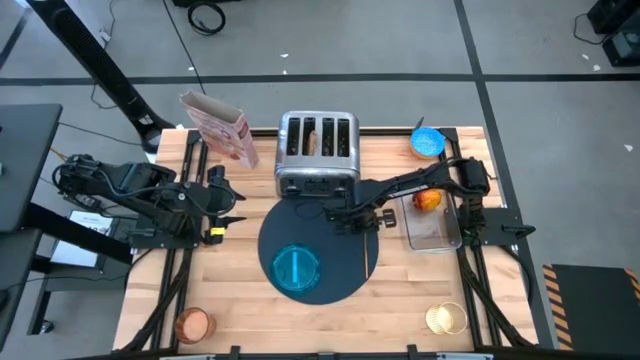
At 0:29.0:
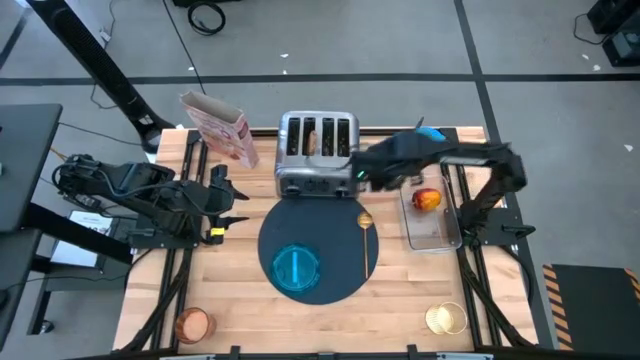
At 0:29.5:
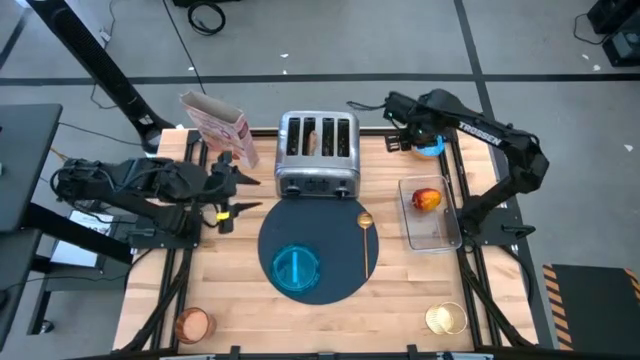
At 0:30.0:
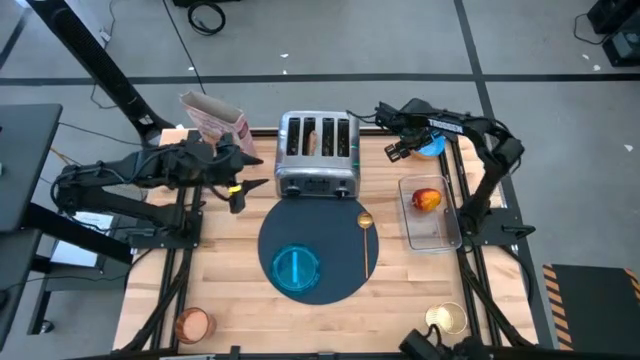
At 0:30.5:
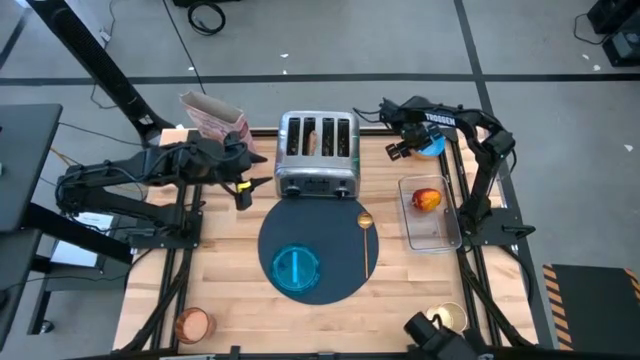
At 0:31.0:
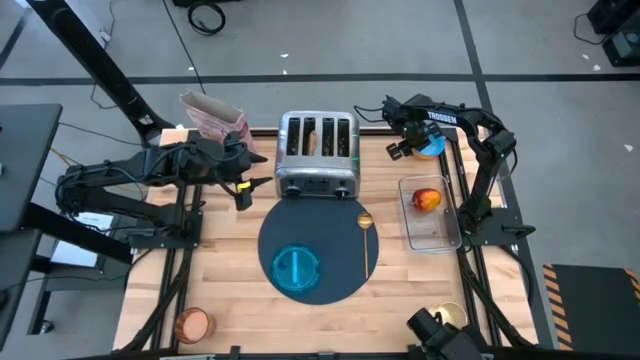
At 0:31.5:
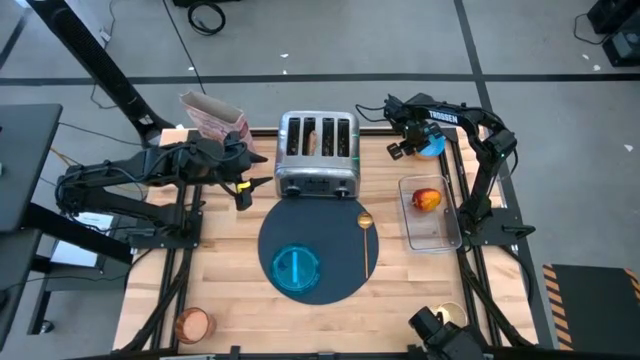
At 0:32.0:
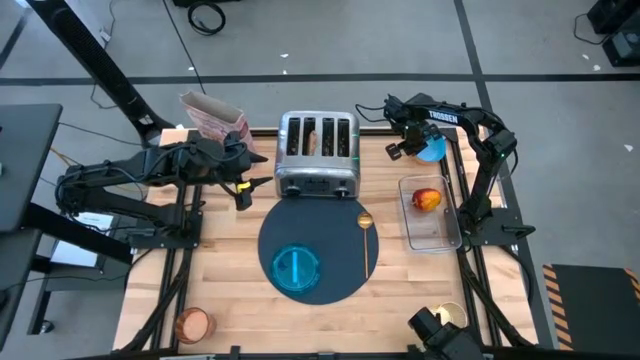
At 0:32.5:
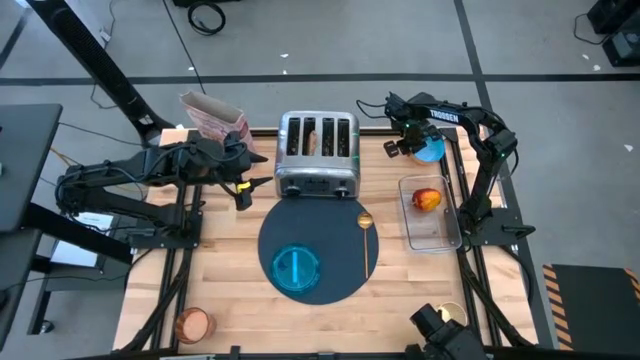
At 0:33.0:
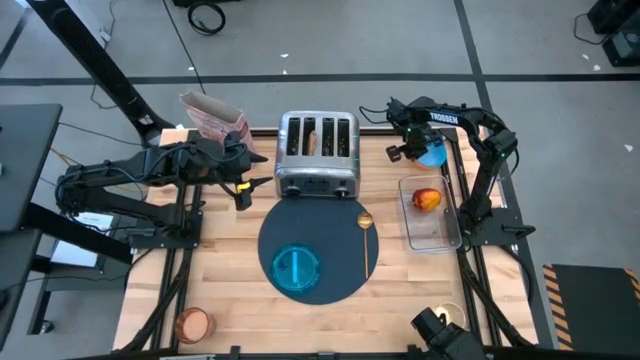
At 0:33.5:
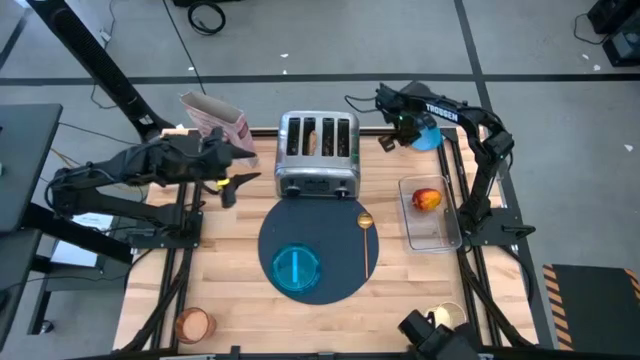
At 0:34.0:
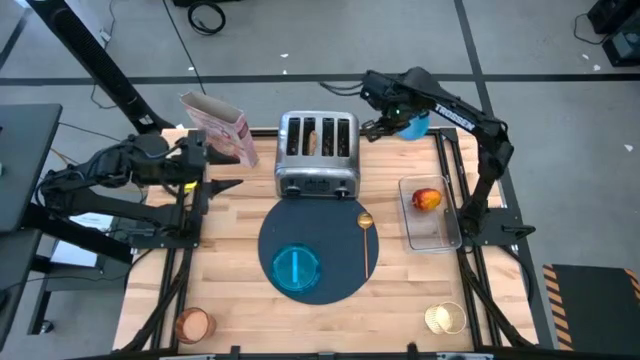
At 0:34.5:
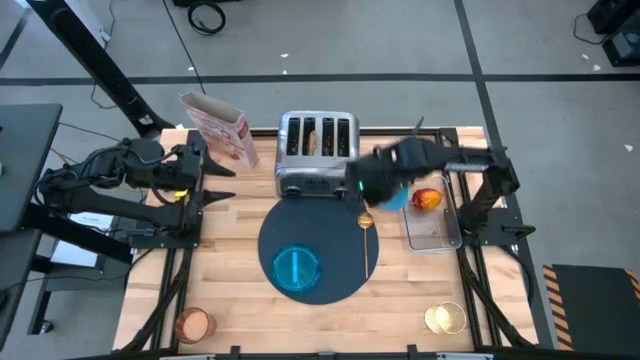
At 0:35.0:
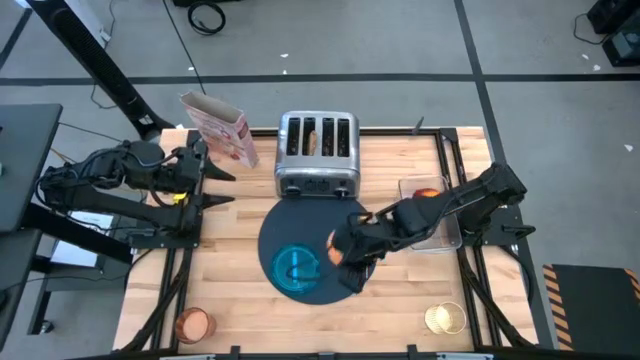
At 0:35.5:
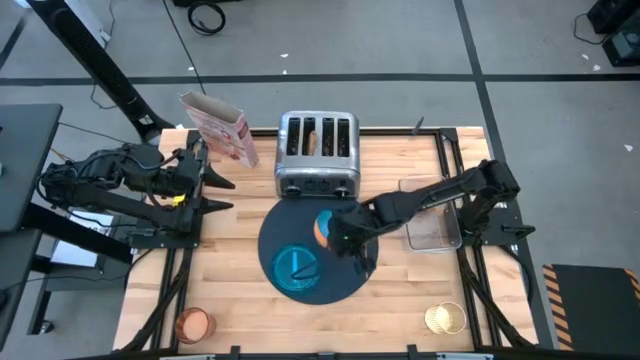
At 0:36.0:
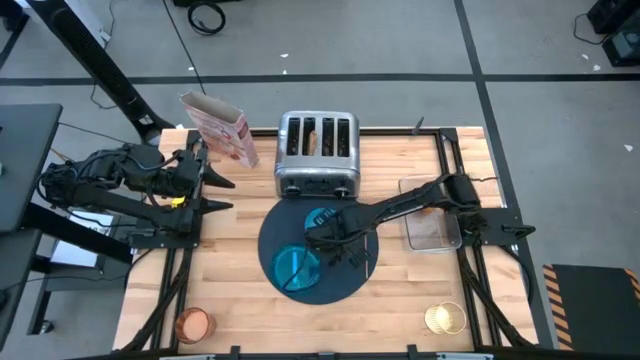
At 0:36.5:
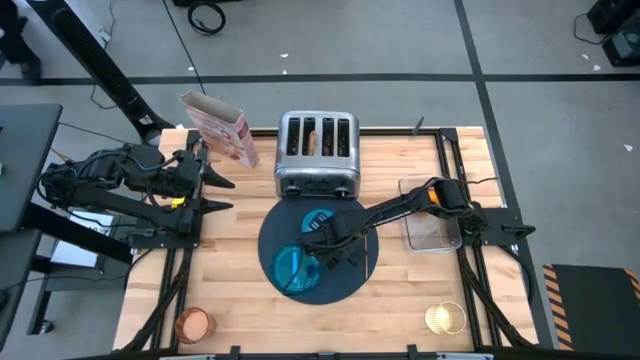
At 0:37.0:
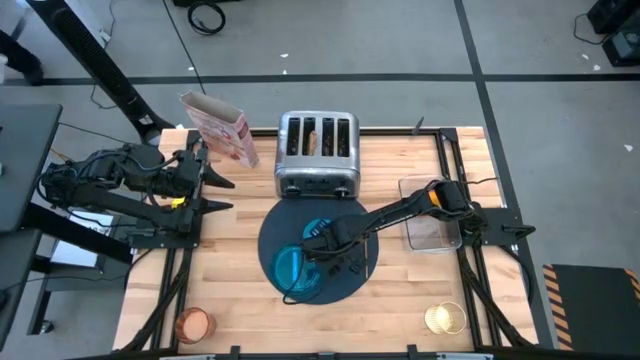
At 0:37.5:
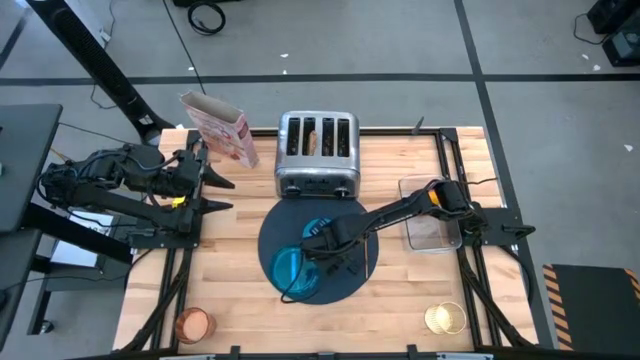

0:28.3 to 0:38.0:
Task: Arrange a breakfast setting
Put the orange and blue bowl on the blue table mat

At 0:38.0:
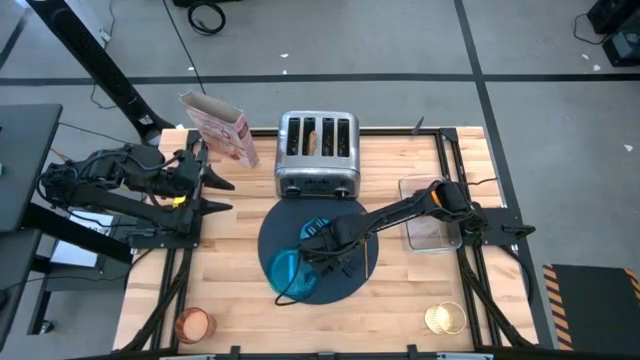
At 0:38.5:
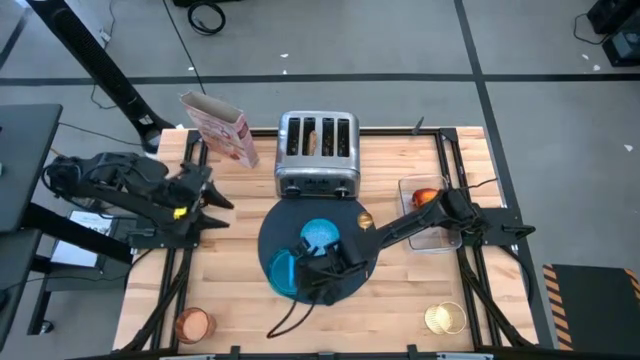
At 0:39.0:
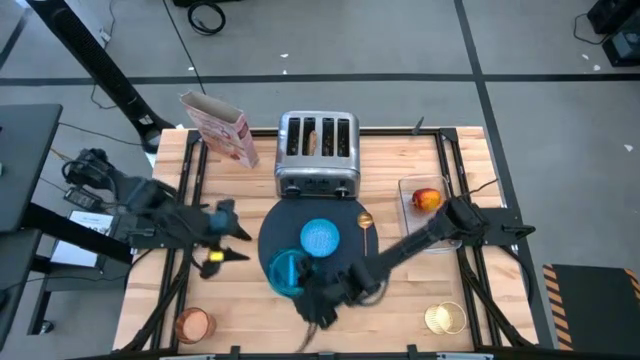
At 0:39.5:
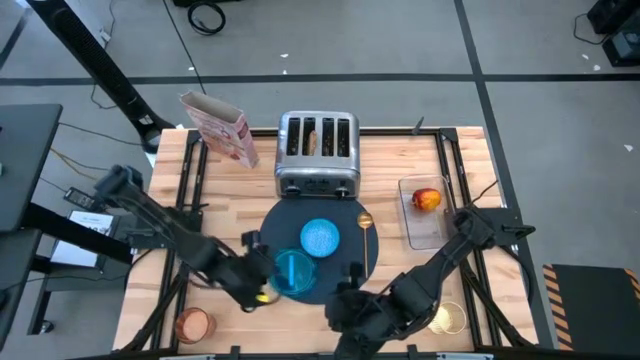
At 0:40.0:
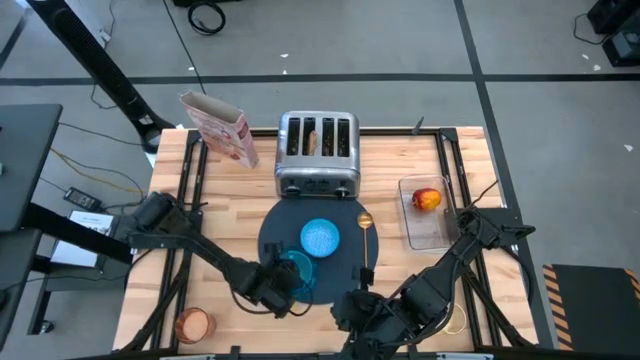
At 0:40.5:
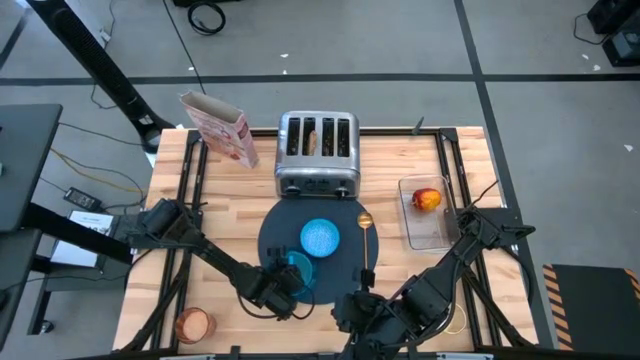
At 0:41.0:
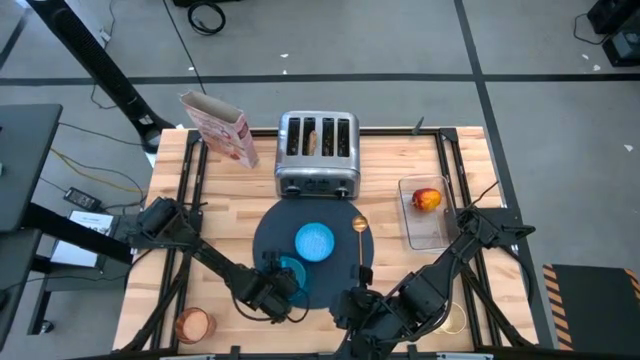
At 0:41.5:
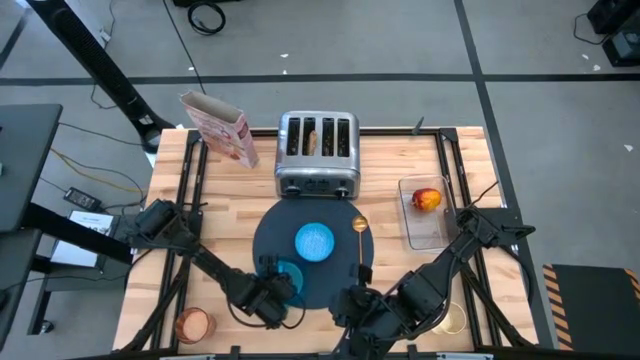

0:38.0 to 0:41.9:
Adjust the blue plate

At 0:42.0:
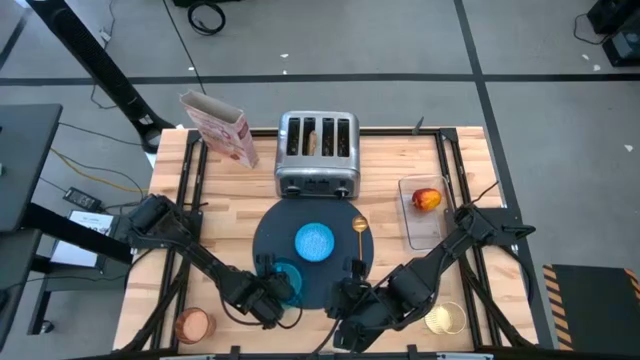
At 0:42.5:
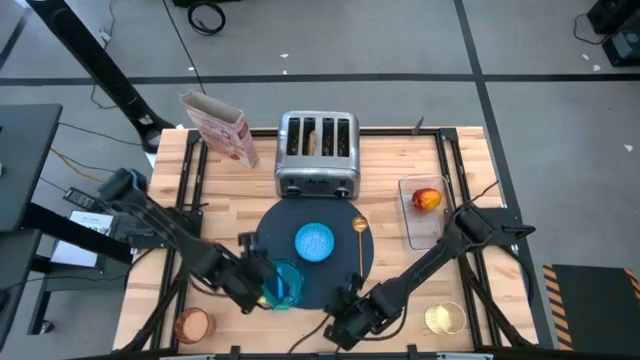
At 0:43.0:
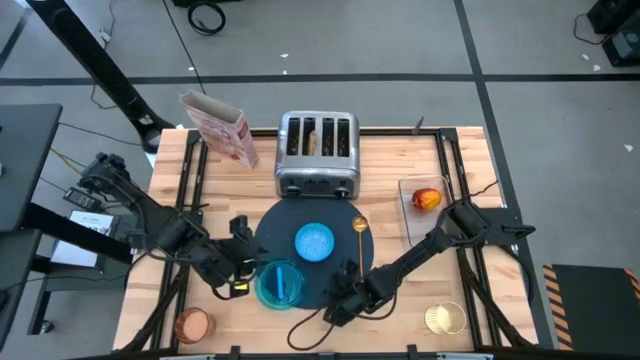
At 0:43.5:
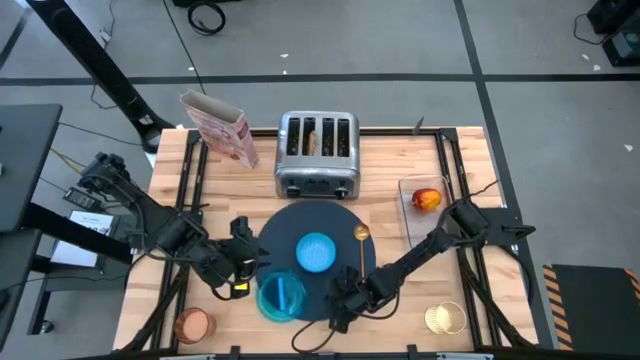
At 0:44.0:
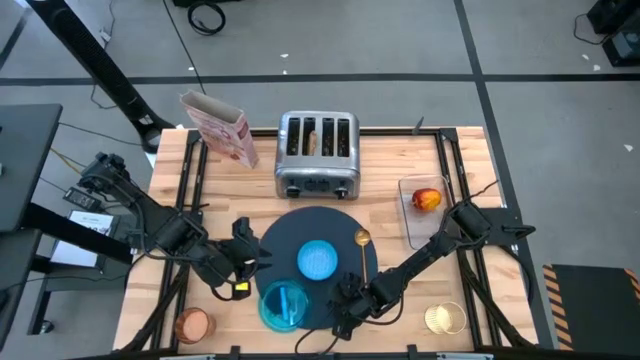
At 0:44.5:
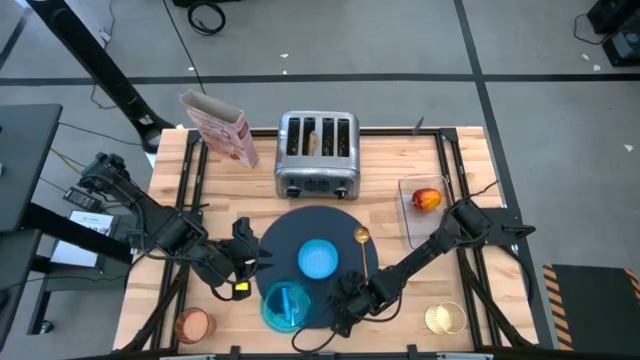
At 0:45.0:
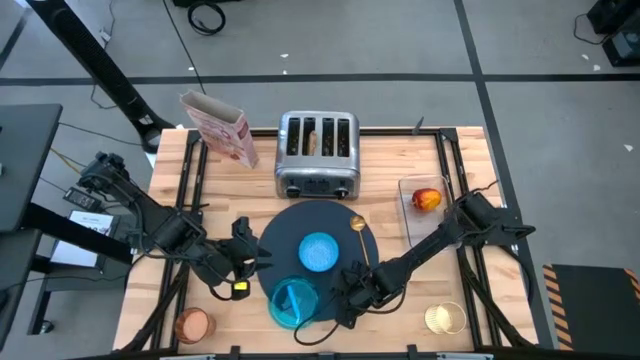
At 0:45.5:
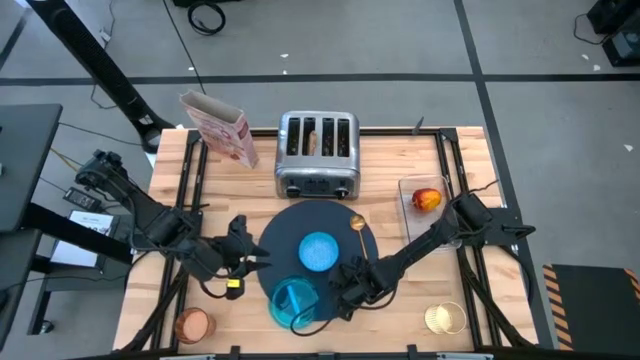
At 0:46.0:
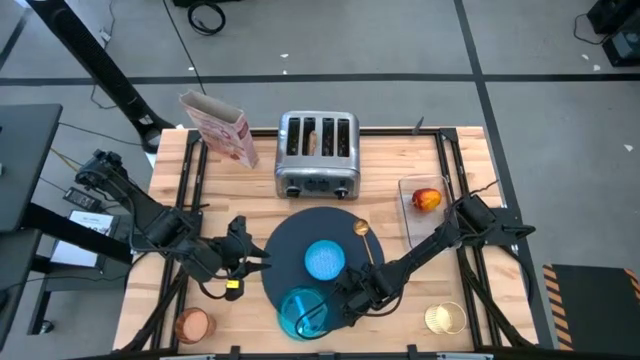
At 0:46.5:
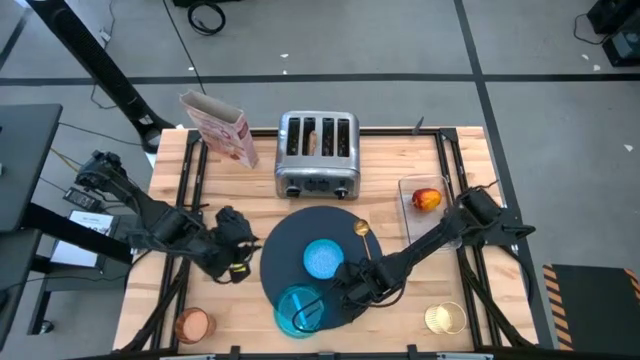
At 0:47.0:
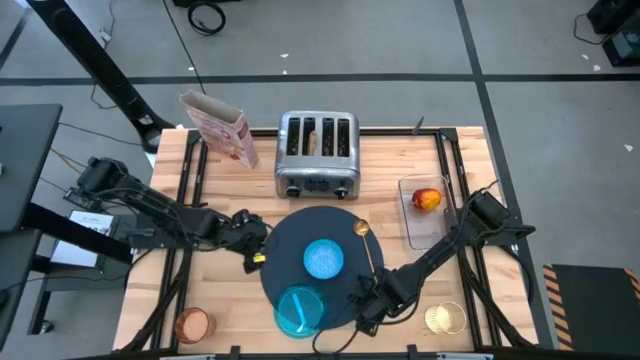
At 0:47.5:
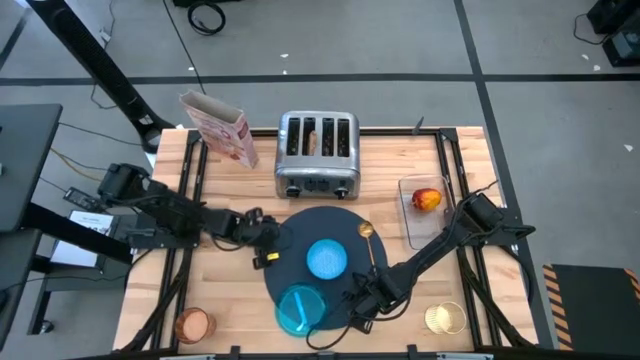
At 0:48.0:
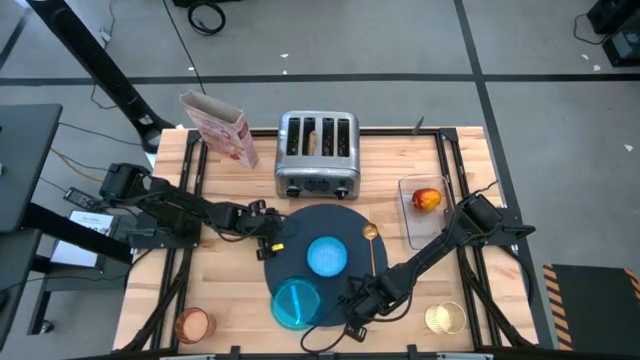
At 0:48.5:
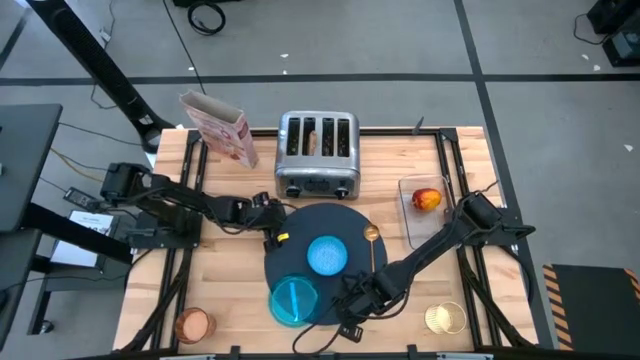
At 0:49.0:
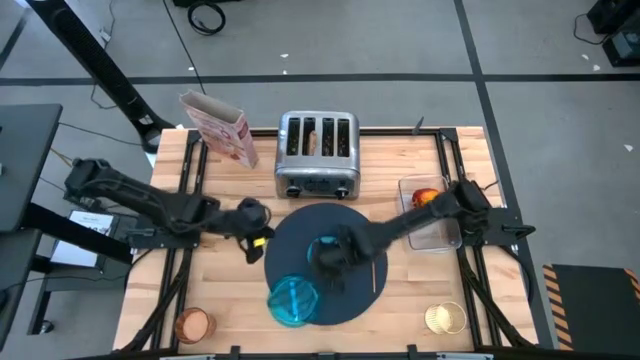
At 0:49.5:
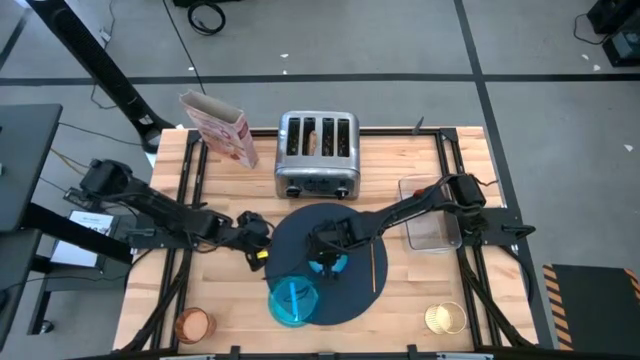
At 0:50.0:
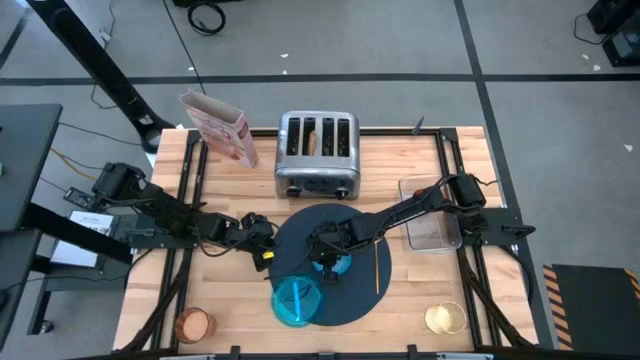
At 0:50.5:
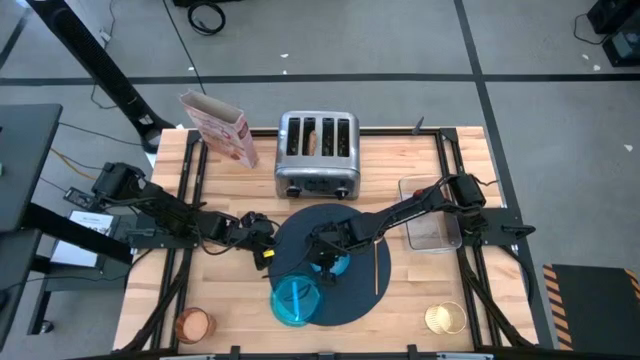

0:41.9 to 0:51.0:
Adjust the blue table mat
